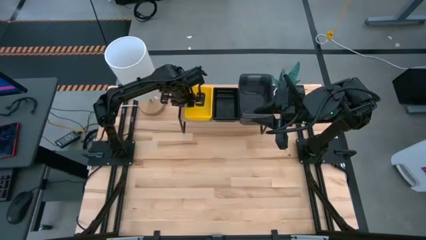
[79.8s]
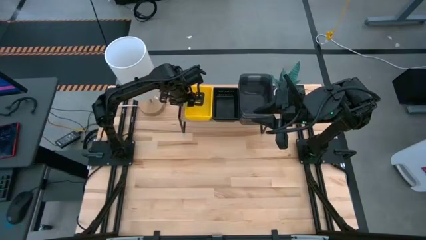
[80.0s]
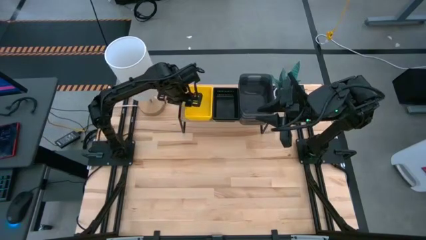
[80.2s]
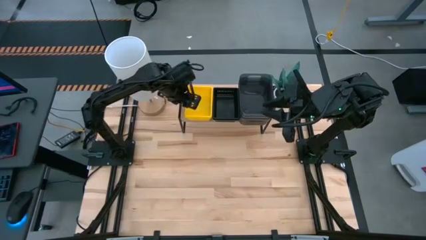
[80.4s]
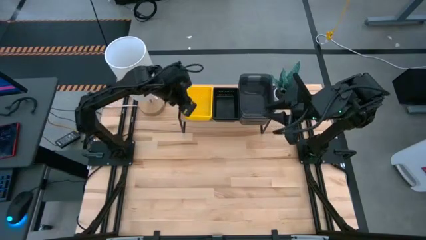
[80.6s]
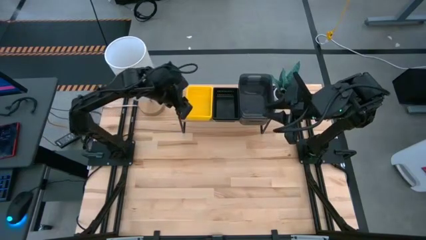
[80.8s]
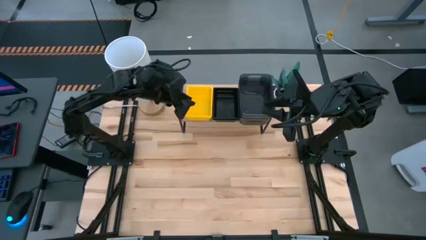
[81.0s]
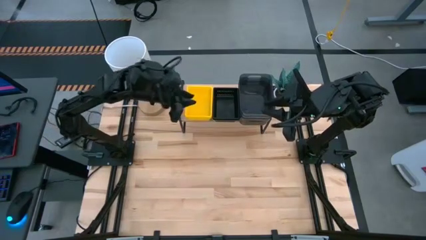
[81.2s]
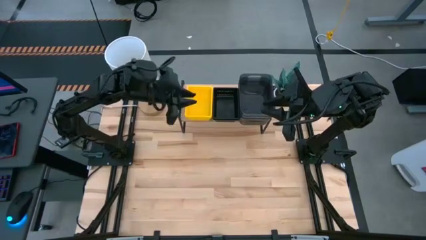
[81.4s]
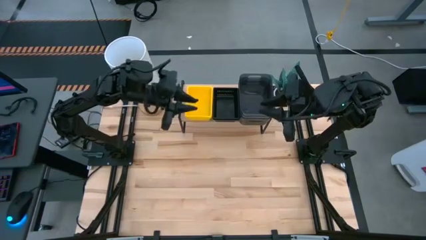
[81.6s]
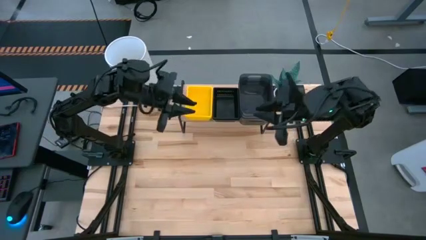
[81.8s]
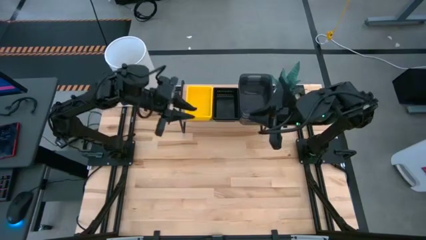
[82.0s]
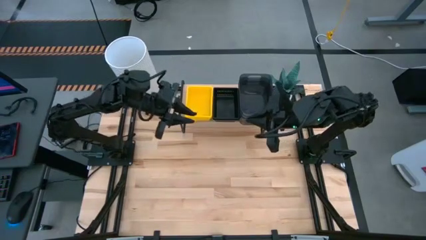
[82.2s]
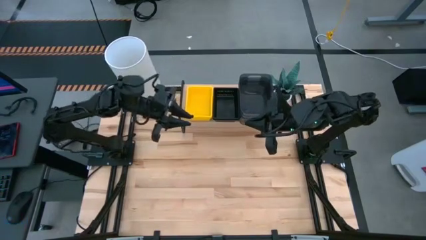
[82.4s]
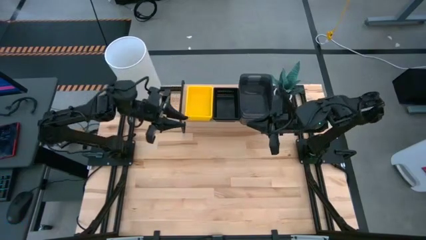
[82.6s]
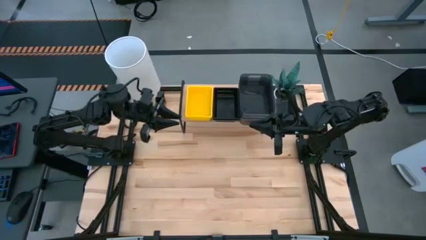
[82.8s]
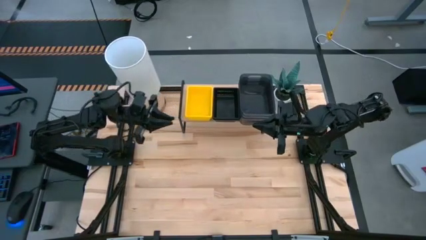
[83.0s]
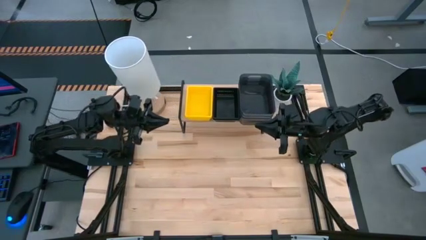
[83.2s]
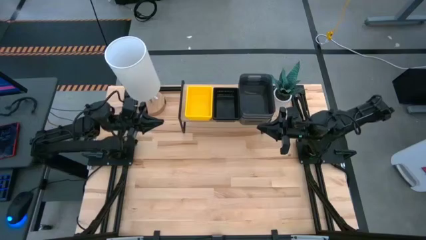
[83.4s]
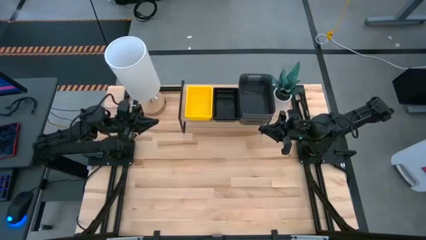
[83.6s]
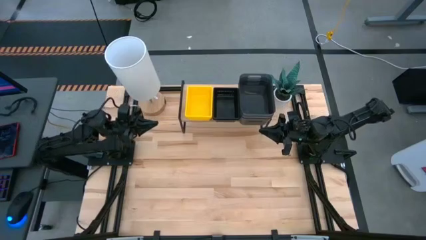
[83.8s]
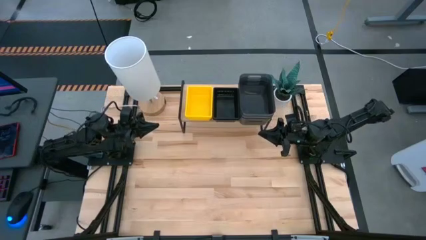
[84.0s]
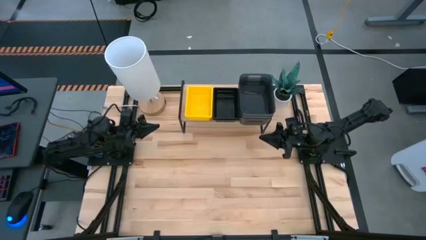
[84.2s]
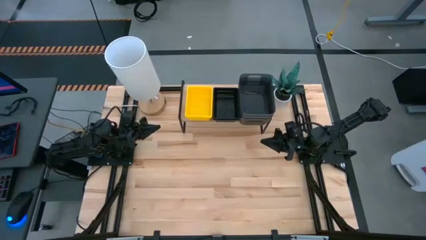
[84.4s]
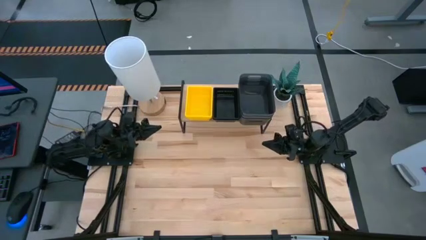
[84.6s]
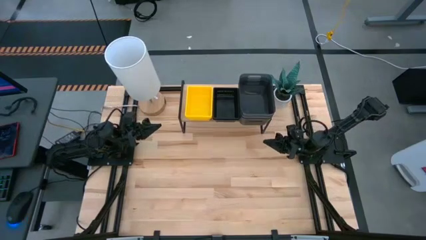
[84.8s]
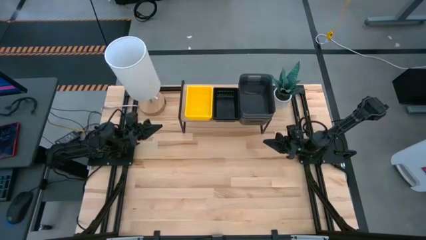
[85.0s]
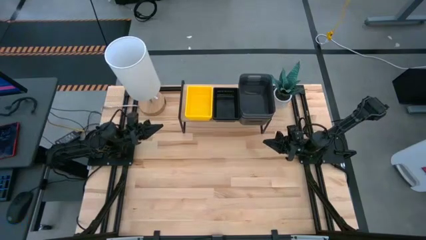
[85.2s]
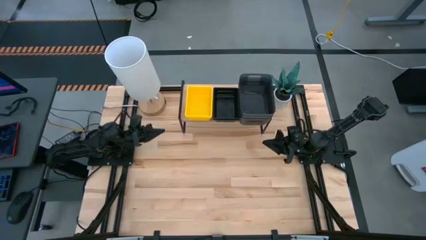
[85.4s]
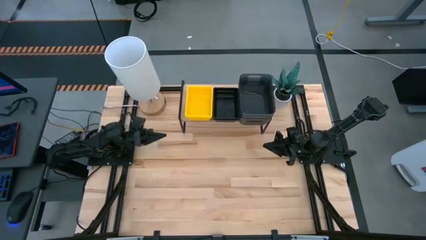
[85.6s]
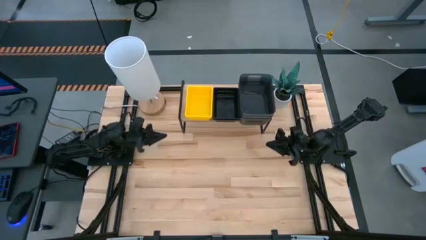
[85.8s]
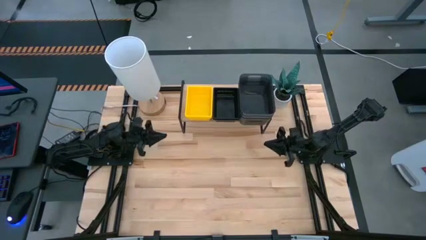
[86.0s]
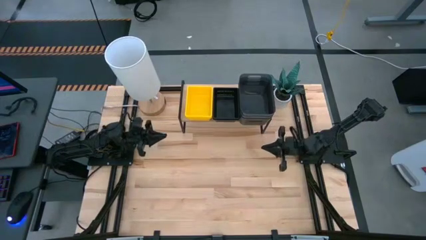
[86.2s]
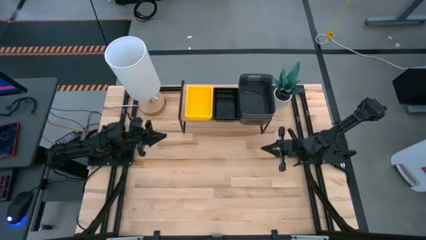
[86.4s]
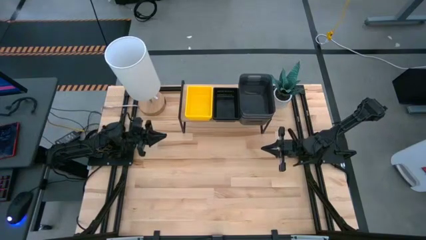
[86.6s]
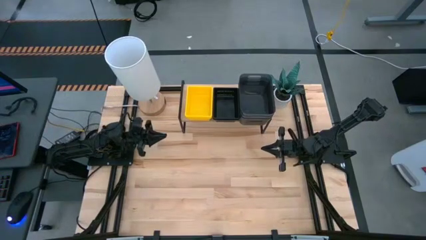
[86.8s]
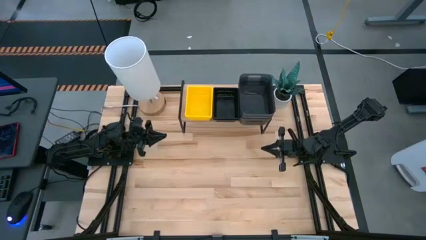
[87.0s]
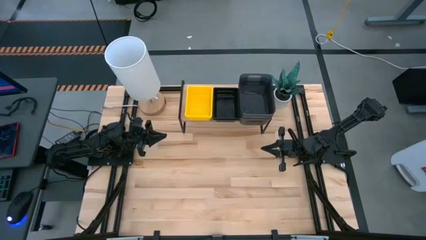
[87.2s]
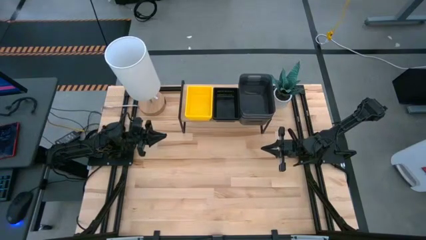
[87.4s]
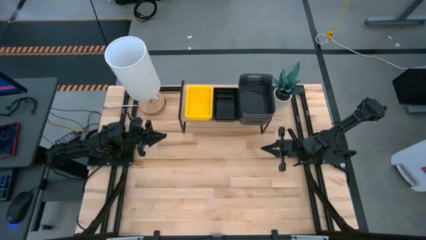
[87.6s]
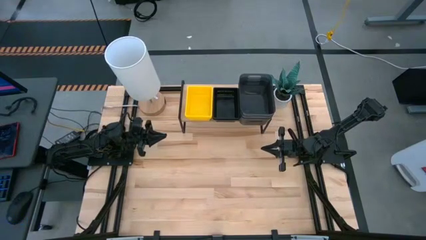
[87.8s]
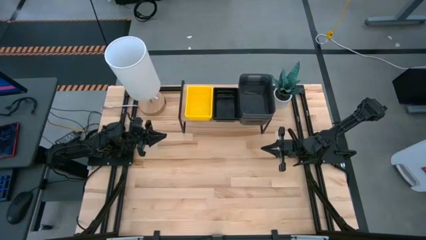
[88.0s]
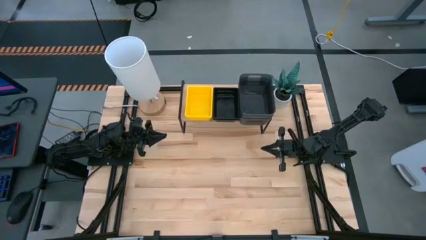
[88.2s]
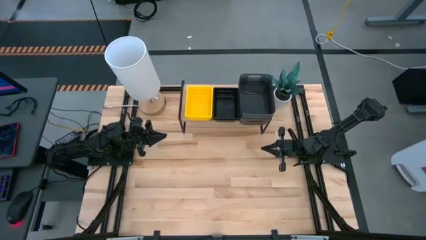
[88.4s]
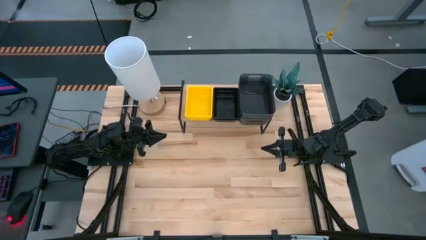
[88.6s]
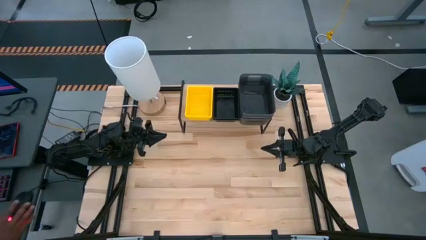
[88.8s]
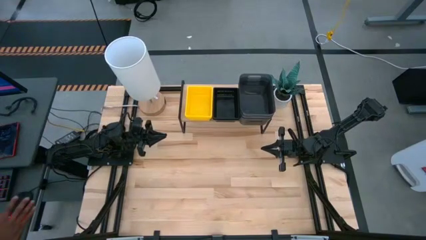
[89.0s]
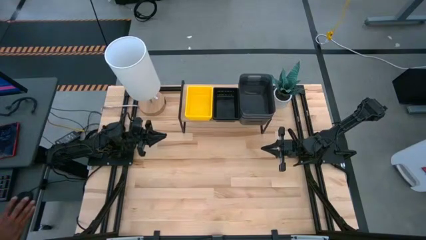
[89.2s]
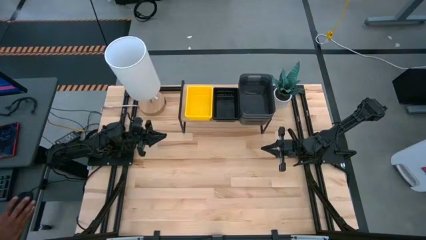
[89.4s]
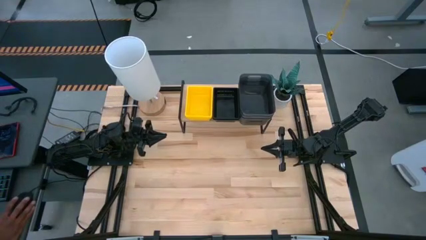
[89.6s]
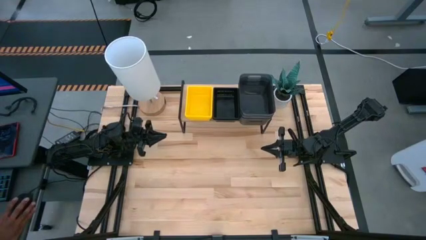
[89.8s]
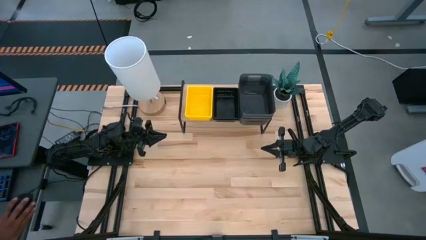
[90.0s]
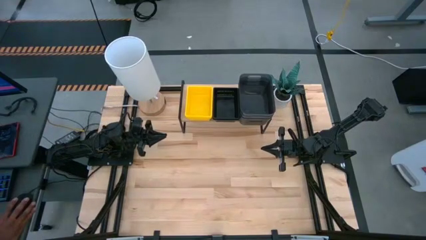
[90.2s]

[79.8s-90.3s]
Task: Stack baskets on shelf by color
Return to Home Position

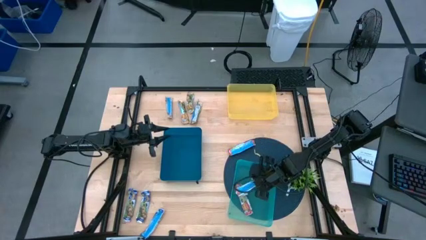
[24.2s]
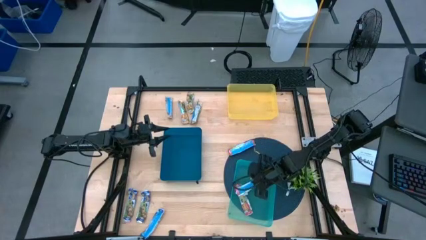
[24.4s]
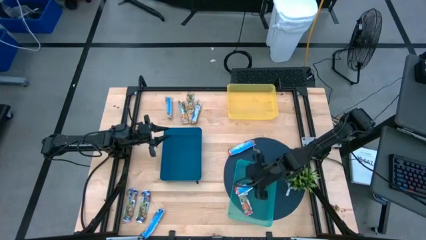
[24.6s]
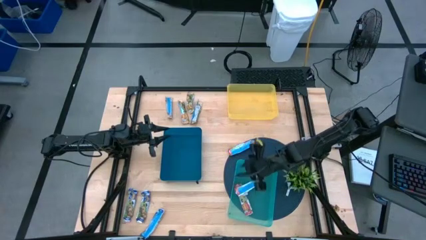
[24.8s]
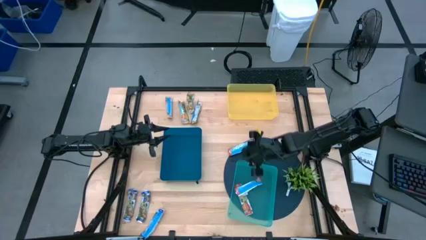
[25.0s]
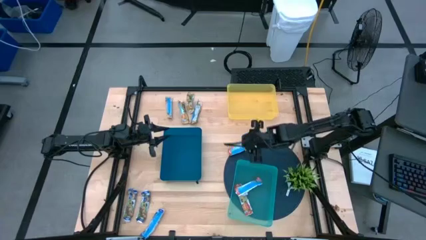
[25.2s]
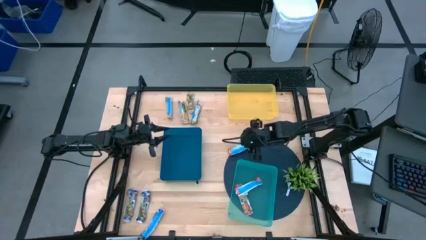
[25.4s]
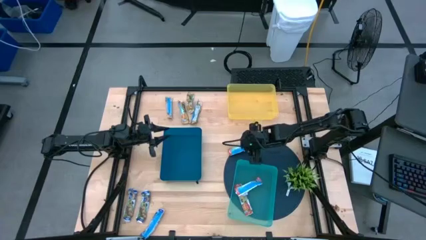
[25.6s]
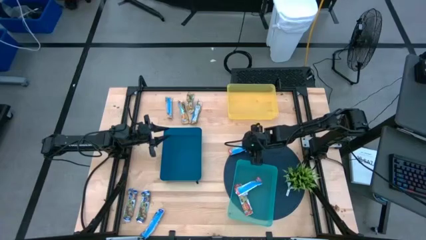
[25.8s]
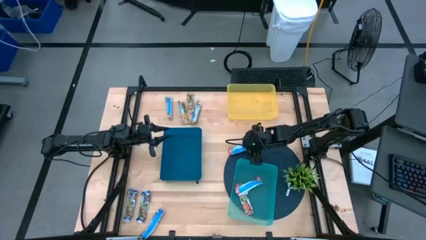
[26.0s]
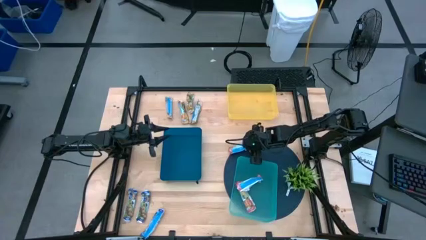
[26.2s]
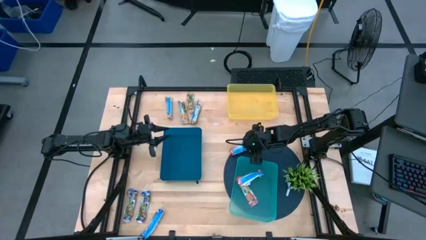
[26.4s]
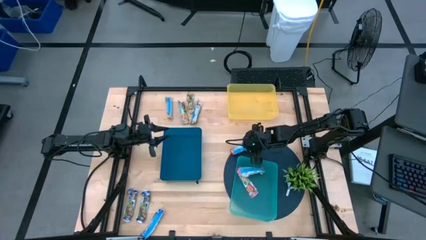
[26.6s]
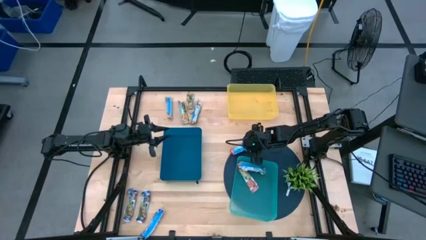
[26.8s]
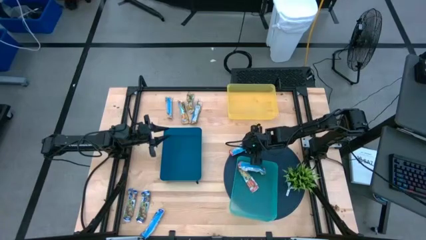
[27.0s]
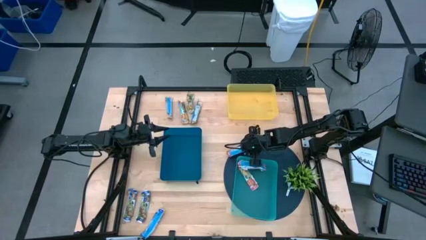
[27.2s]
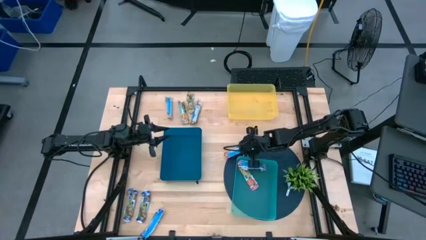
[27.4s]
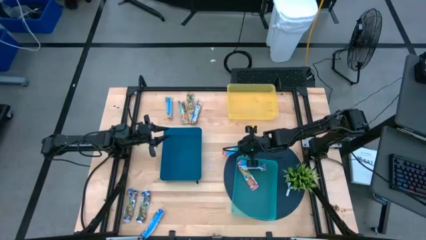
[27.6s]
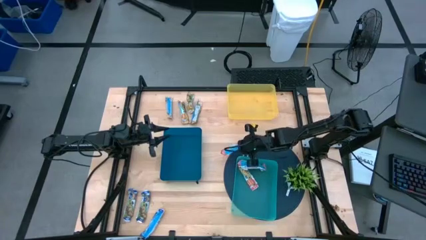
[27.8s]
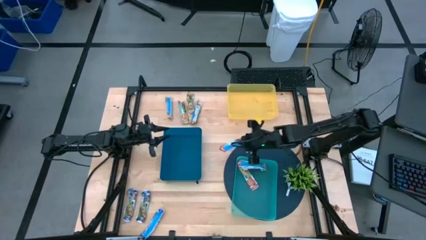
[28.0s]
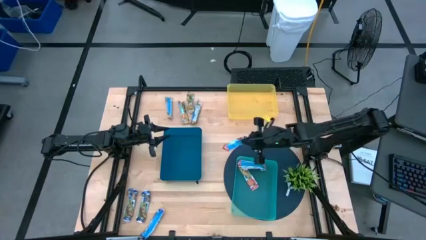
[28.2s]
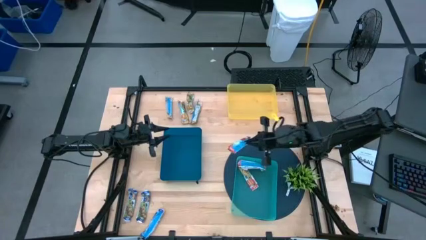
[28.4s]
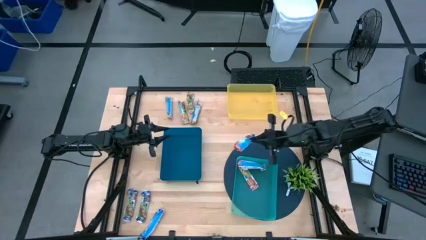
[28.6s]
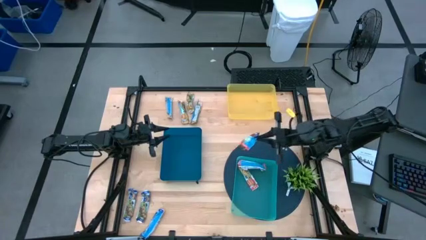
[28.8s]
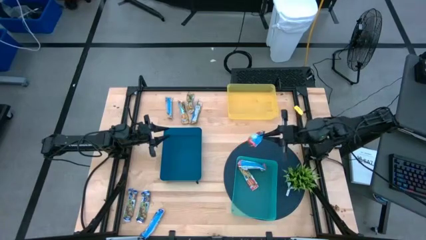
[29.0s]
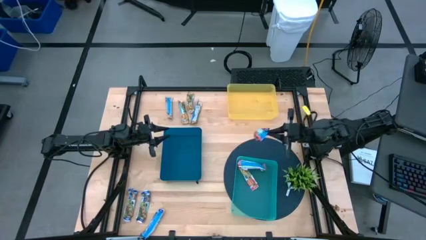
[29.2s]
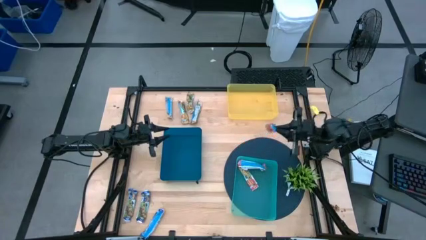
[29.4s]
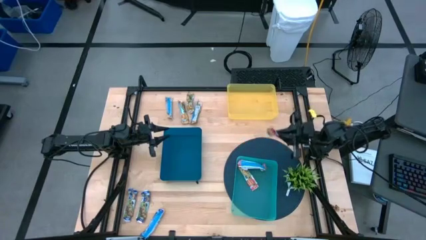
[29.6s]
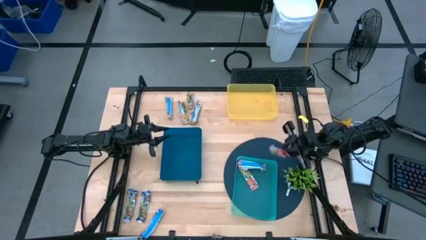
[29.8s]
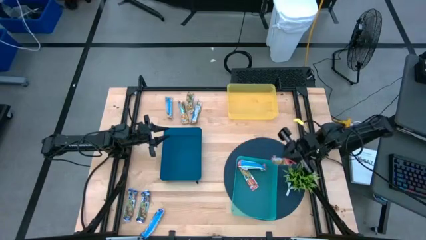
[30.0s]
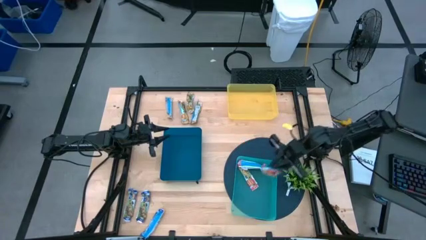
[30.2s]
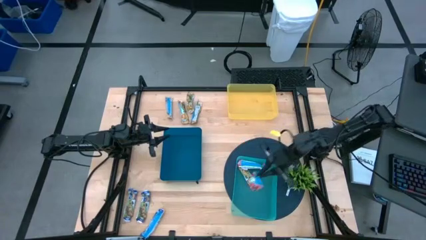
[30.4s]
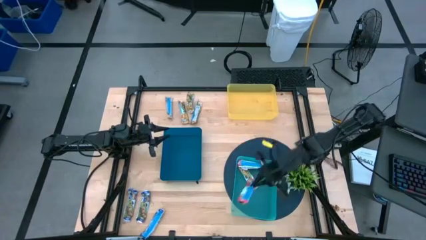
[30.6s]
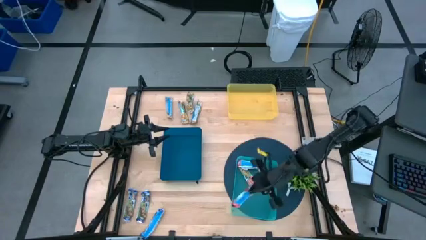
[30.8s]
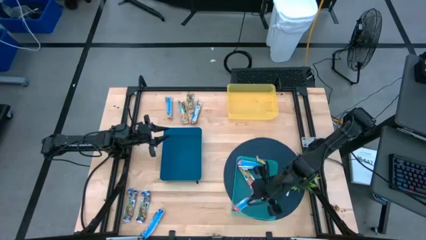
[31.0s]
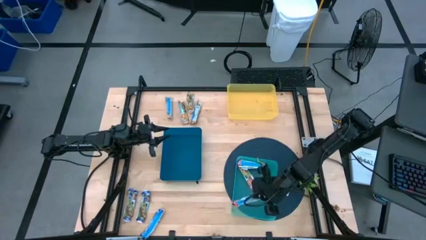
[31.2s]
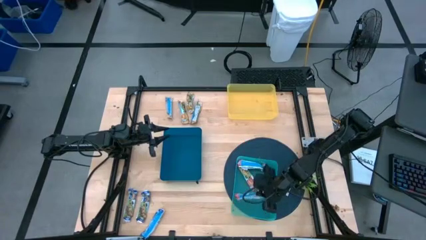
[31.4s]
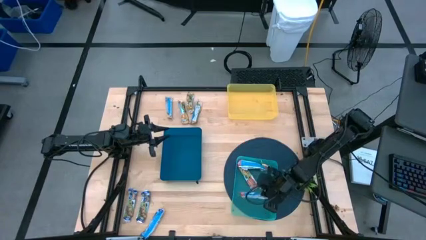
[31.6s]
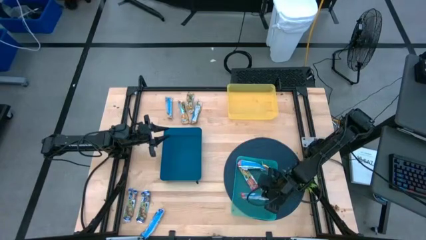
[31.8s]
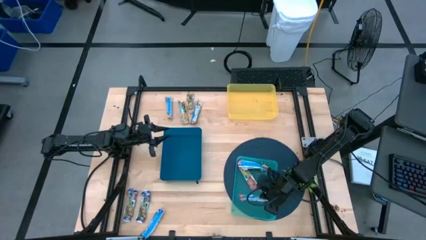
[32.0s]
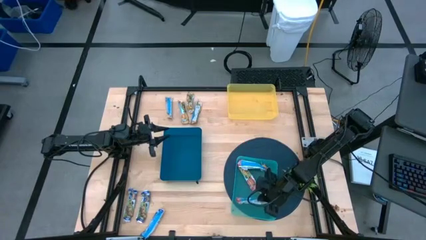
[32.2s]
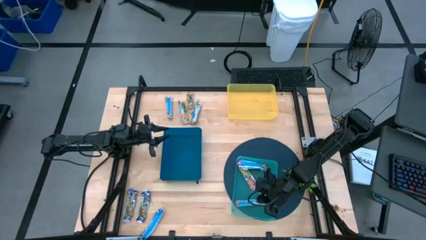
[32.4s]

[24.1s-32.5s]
Task: Pick and place Granola Bars by type
Put the red granola bar into the green bin
